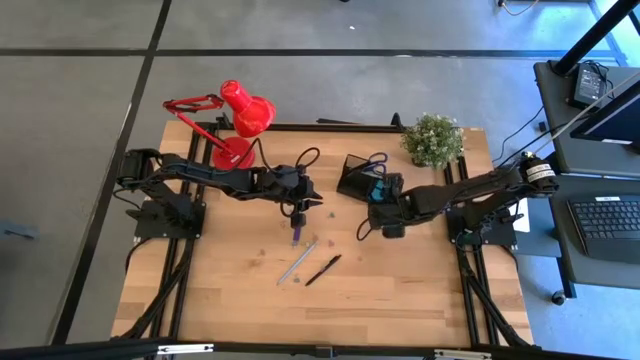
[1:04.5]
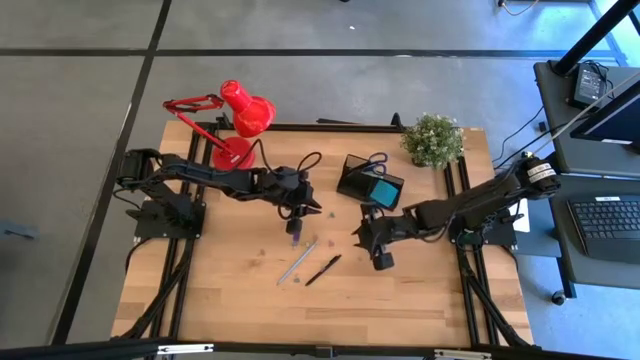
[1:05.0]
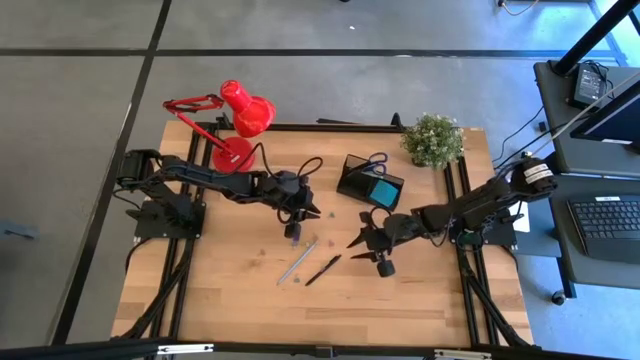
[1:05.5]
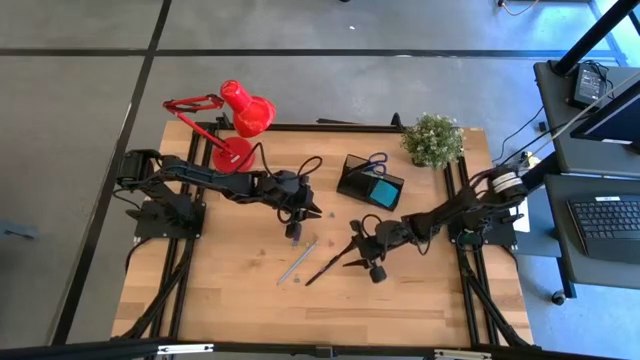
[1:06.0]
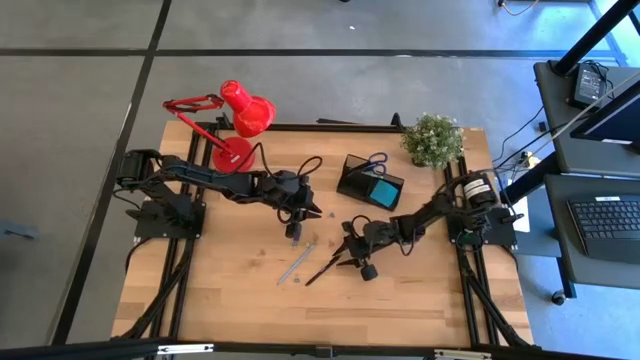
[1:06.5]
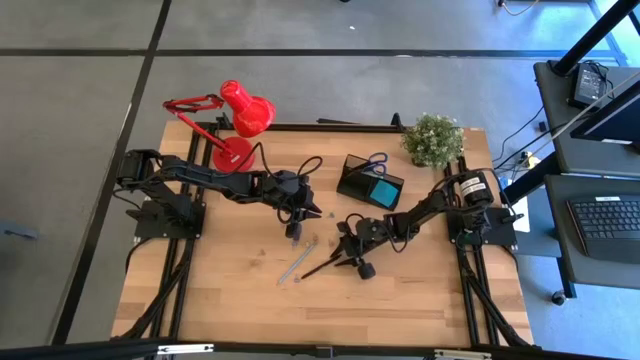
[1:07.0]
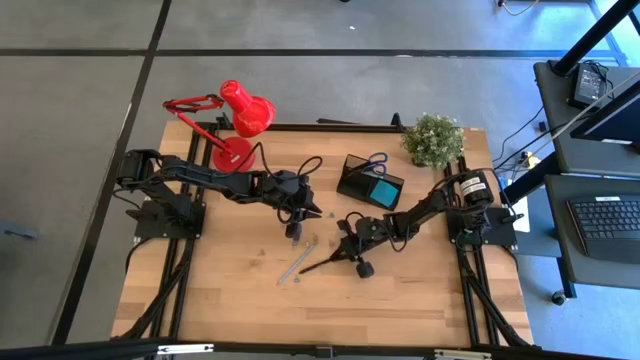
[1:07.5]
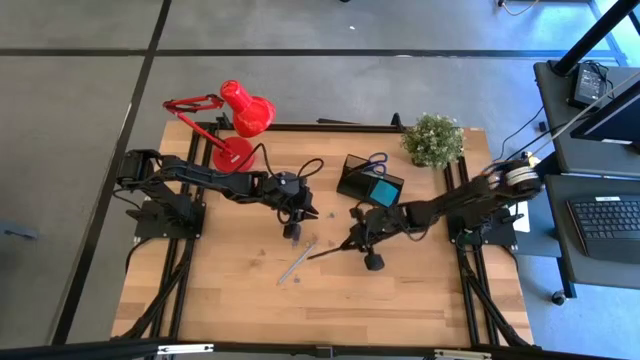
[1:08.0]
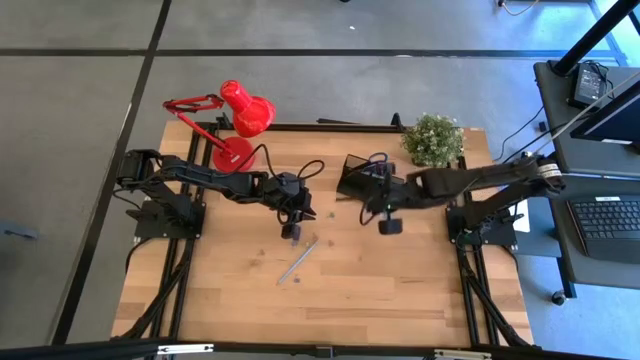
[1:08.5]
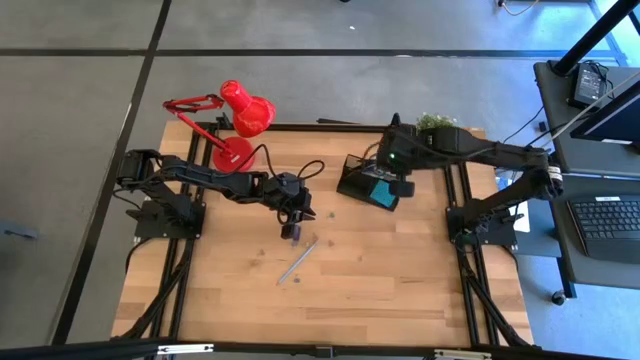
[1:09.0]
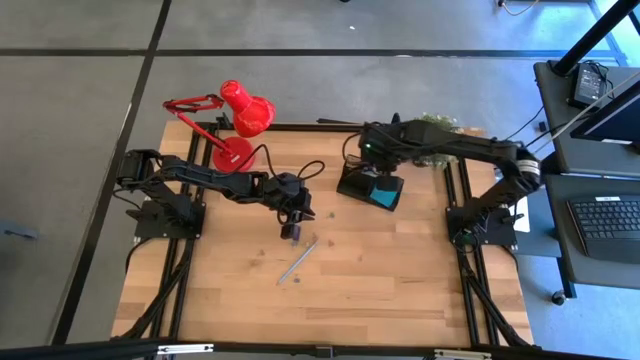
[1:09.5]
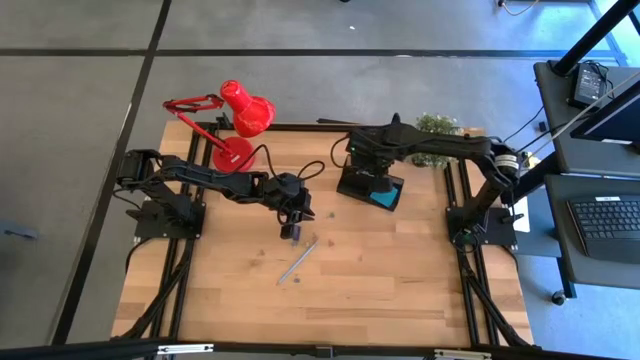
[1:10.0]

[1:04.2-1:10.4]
Task: Pick and place office supplies into organizer
Put the black pen into the black desk organizer

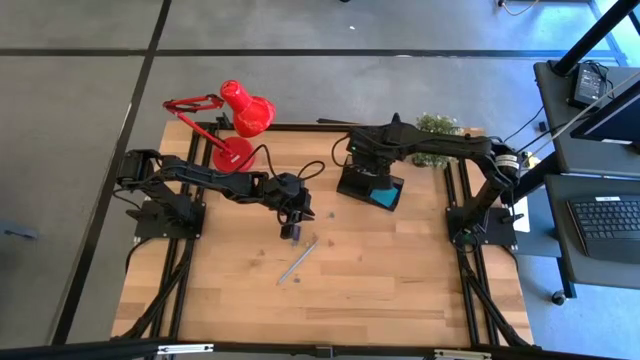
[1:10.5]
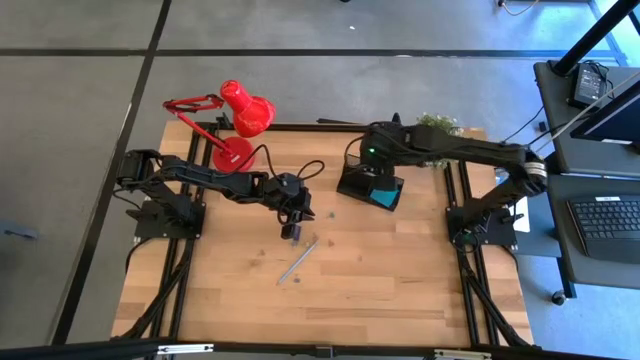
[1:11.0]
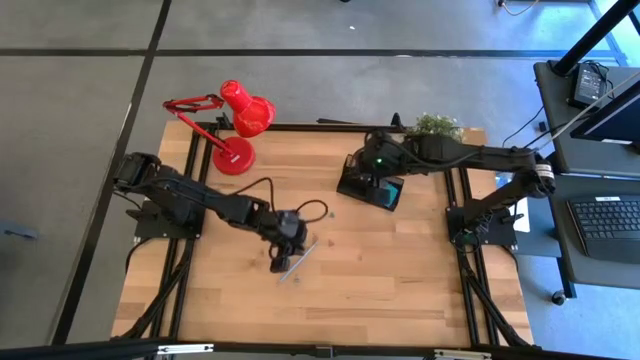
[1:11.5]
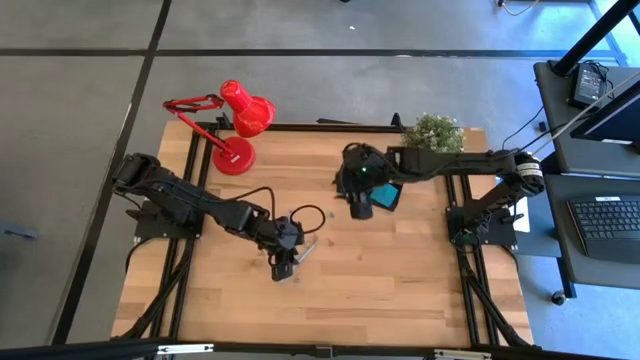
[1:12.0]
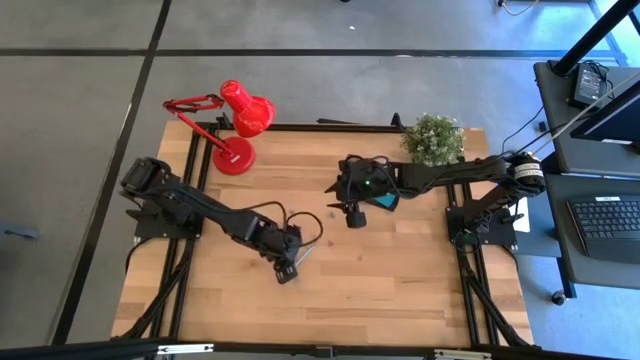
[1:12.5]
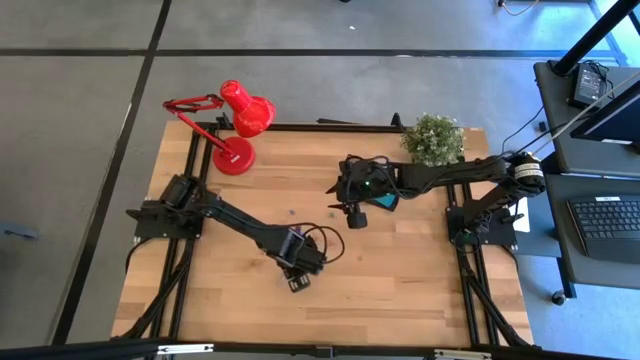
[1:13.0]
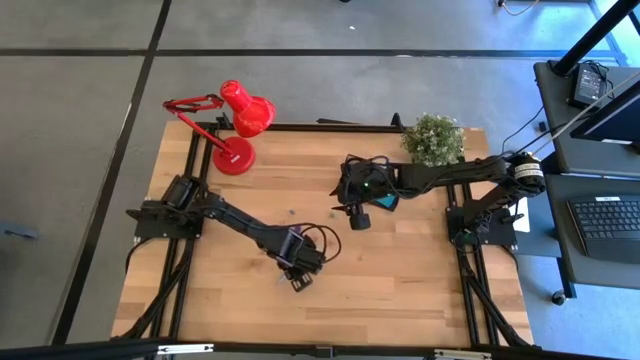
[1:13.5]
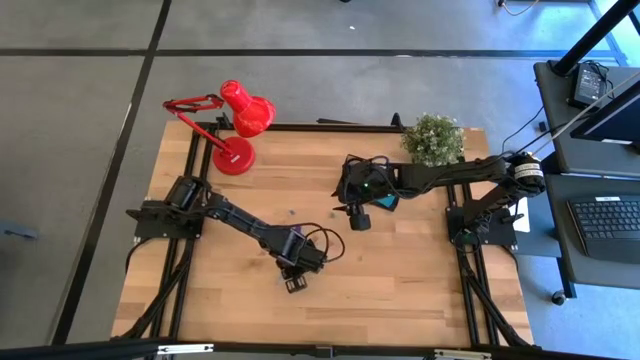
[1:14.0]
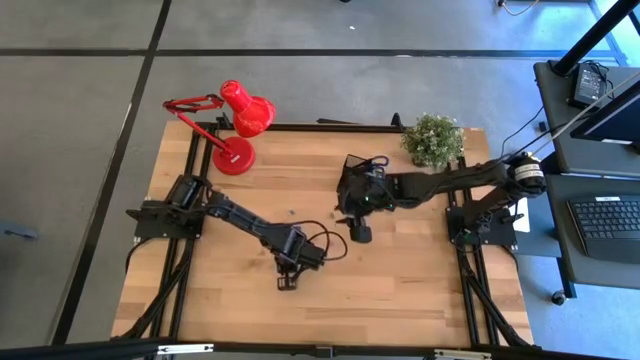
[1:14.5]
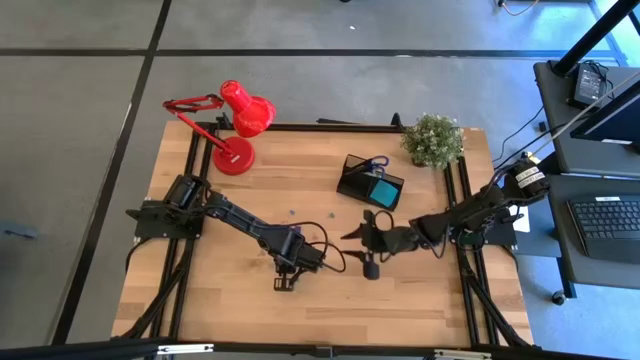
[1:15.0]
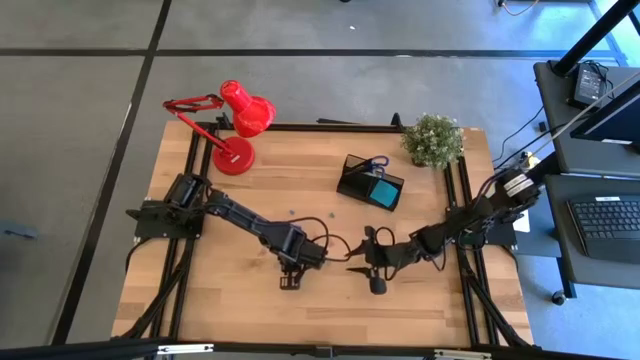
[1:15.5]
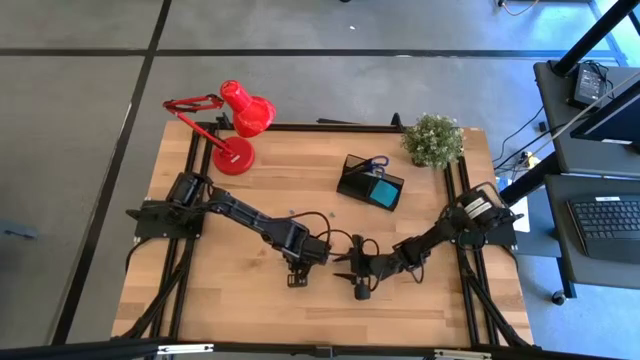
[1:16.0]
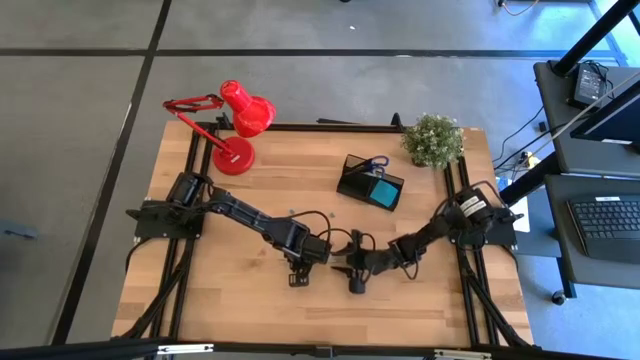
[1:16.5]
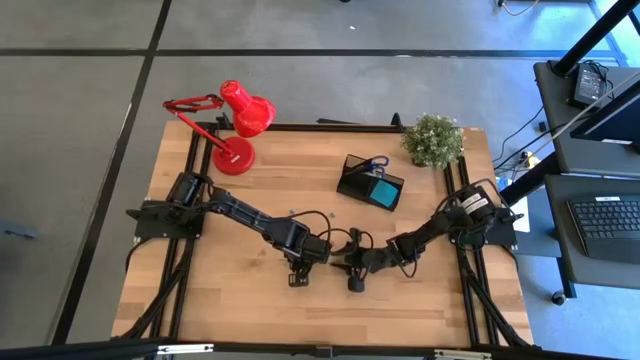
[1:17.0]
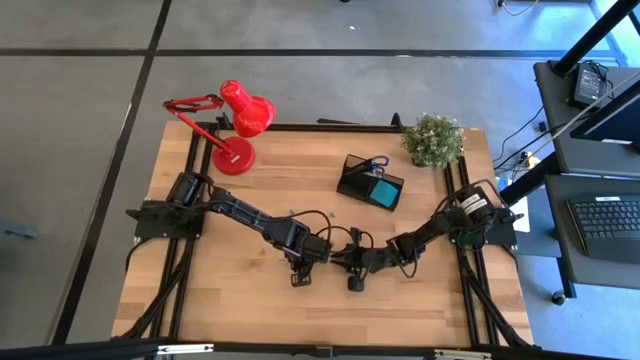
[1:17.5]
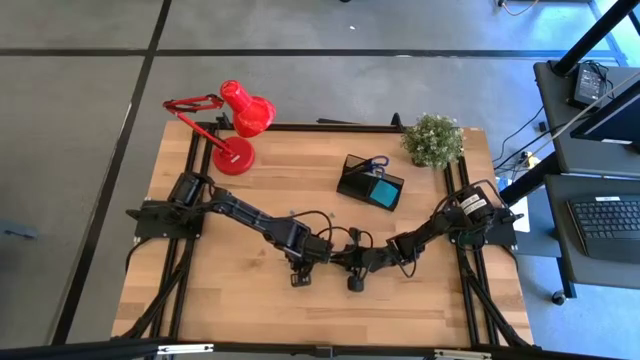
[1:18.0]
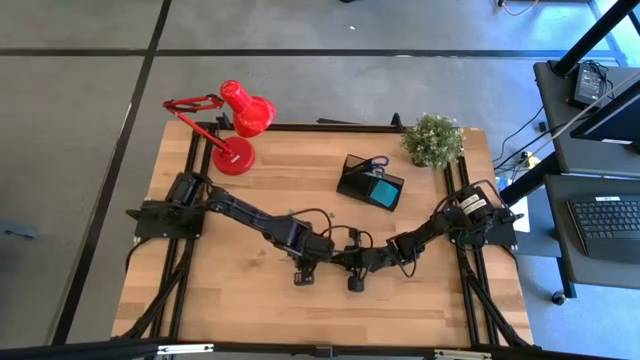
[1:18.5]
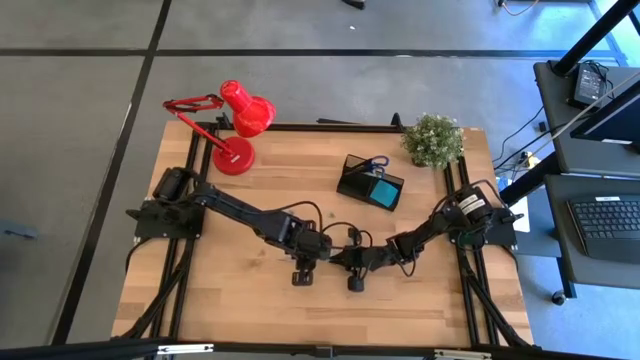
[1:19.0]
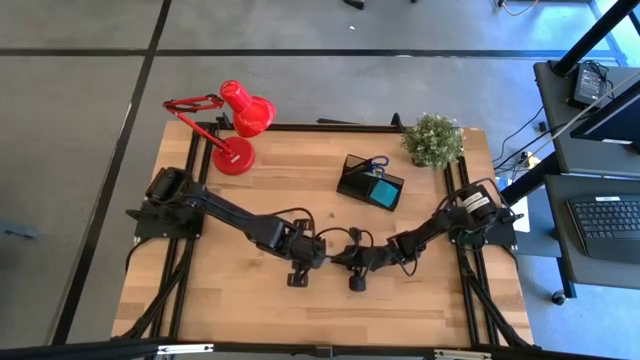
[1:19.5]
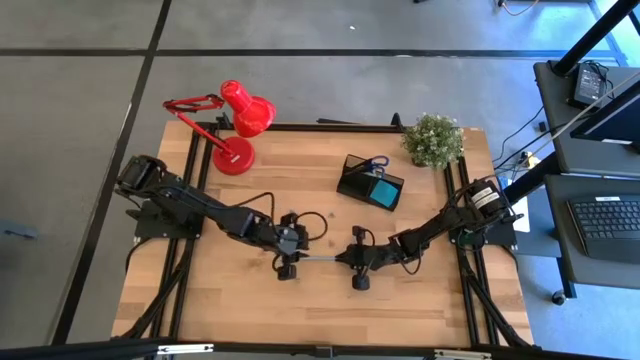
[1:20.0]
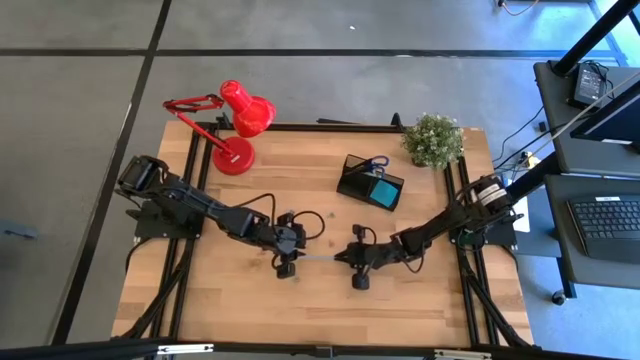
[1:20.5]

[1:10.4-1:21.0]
Put the blue pencil into the black desk organizer

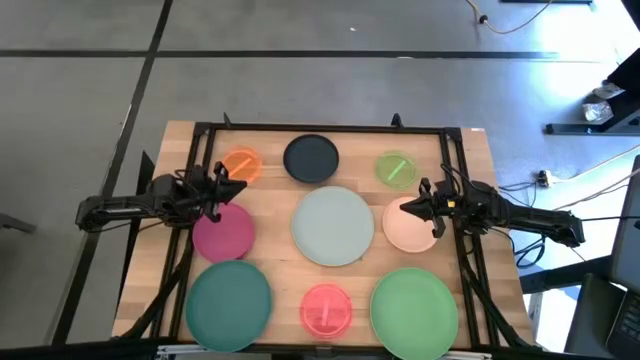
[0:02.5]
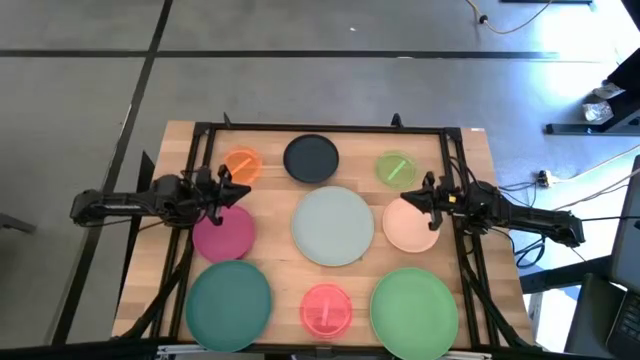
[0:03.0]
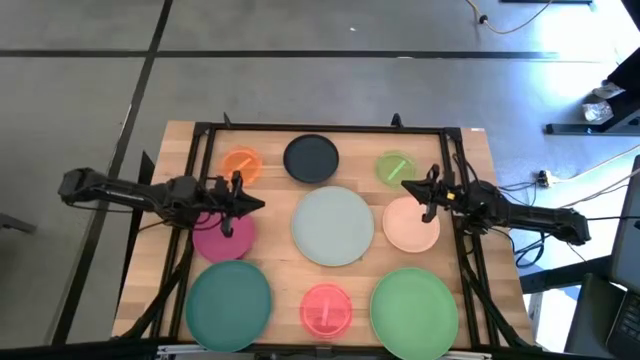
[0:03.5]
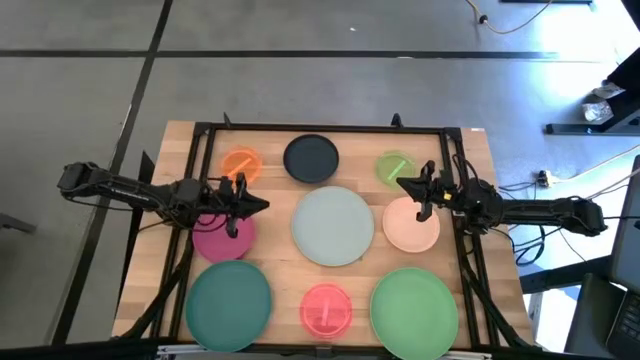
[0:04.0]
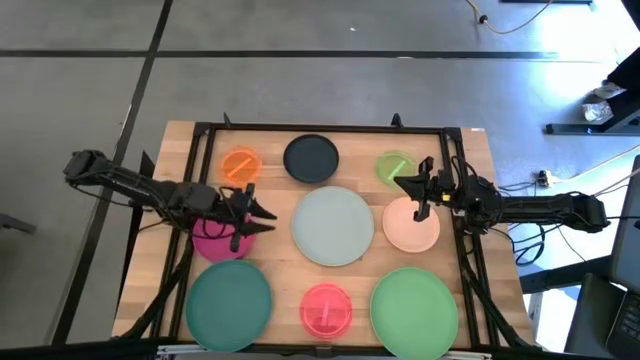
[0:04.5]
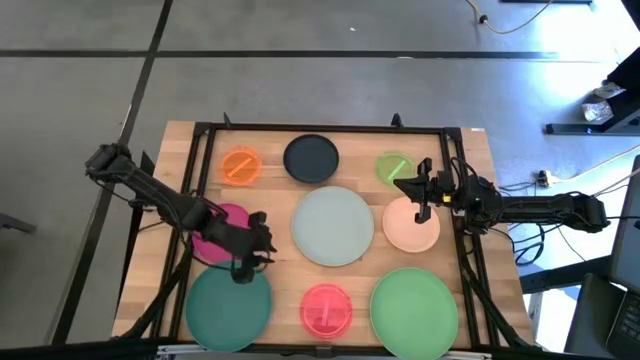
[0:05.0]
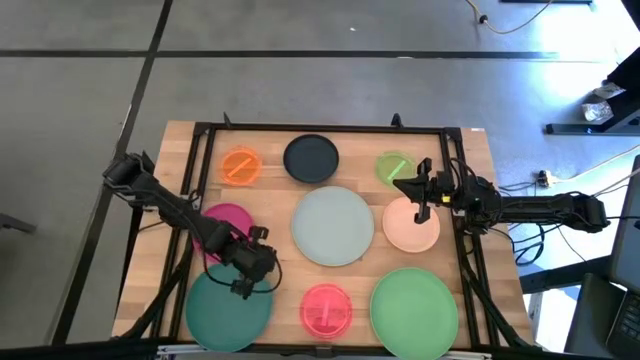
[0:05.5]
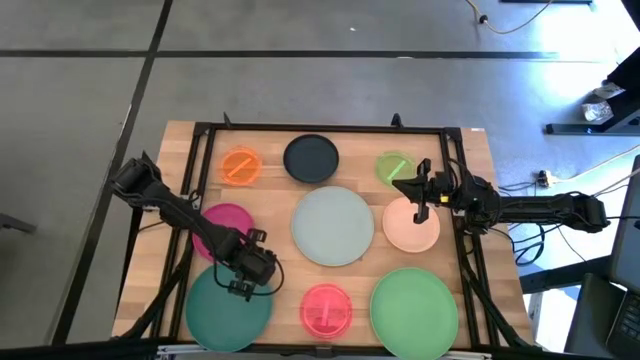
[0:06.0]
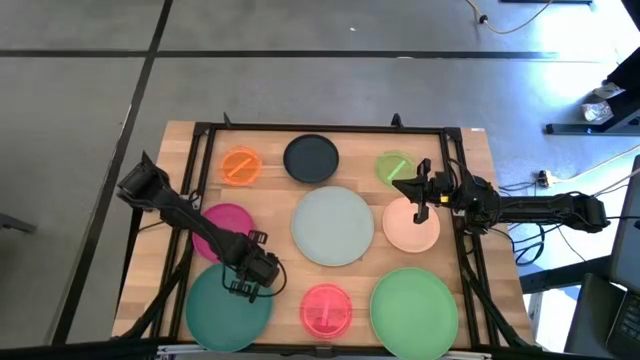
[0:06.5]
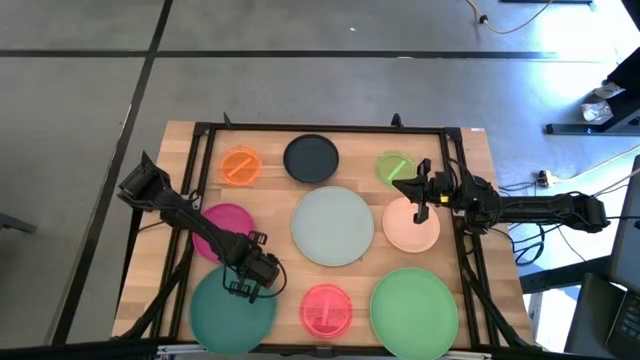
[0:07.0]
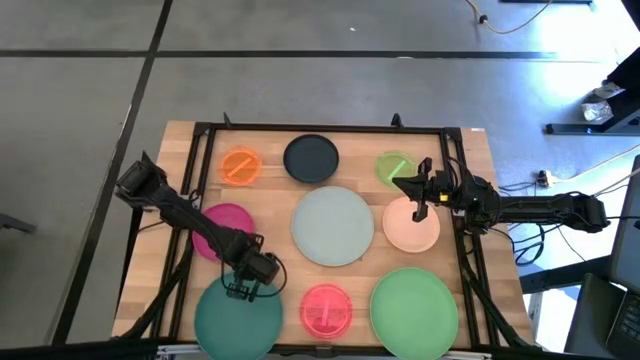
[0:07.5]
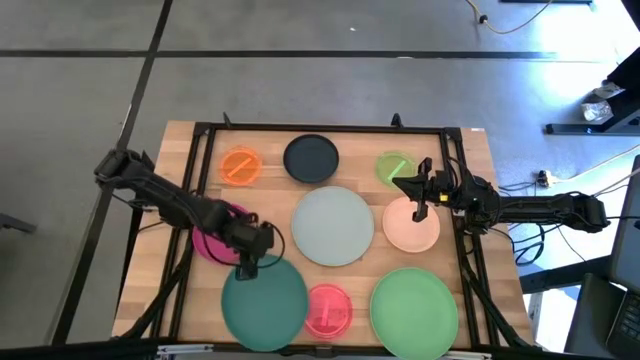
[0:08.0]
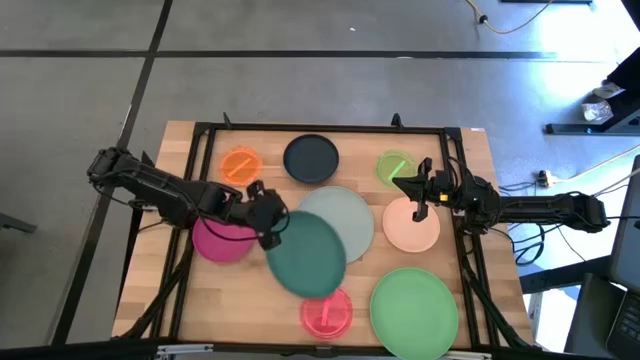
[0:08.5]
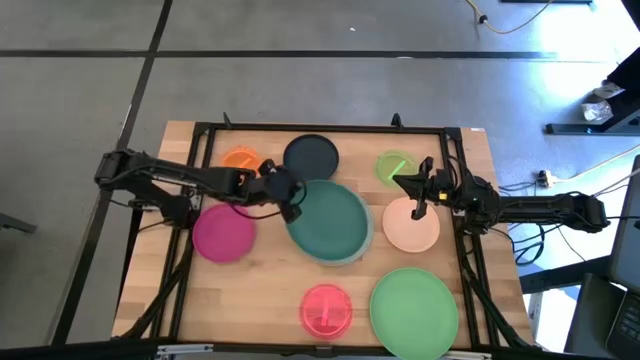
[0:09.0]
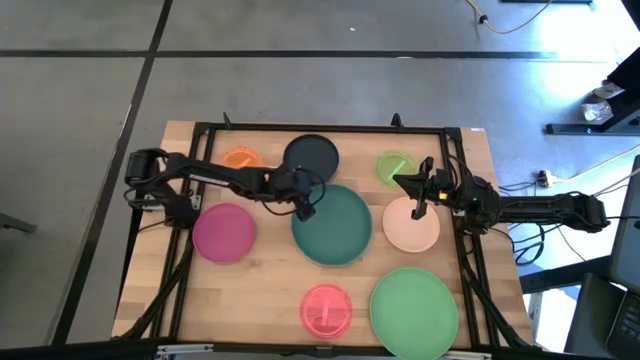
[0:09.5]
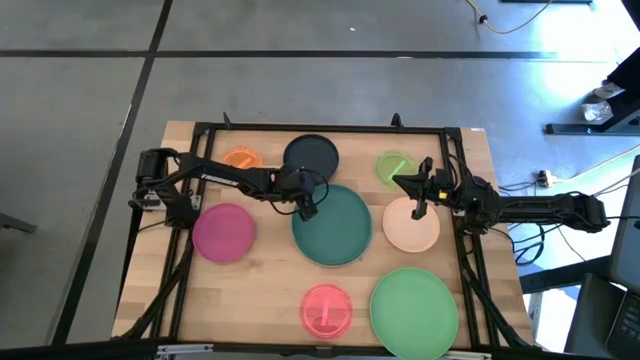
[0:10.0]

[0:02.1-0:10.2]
Task: Stack plastic plates
Stack the green plate on top of the gray plate
